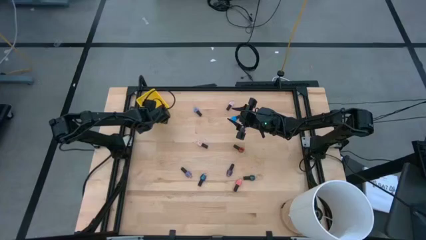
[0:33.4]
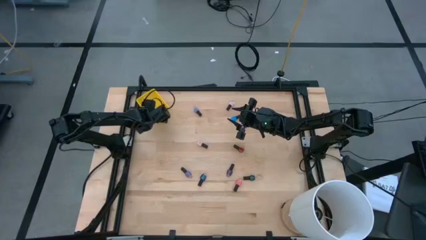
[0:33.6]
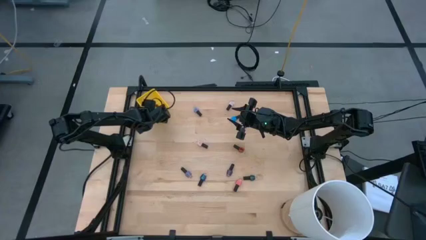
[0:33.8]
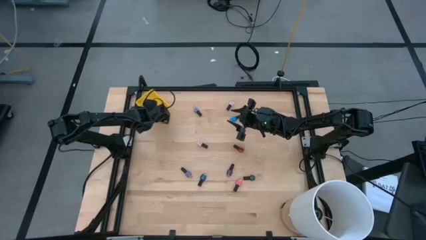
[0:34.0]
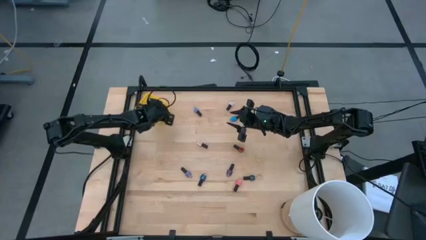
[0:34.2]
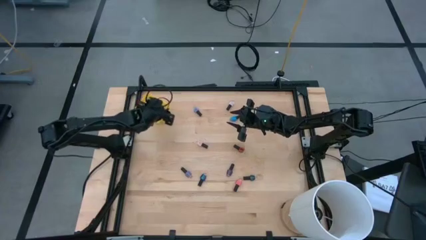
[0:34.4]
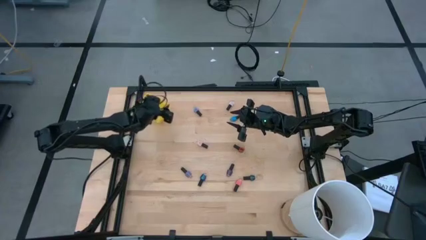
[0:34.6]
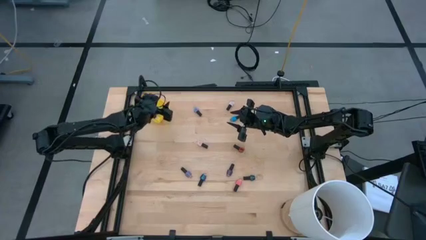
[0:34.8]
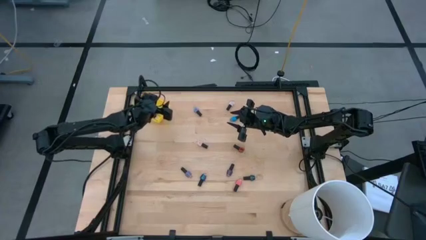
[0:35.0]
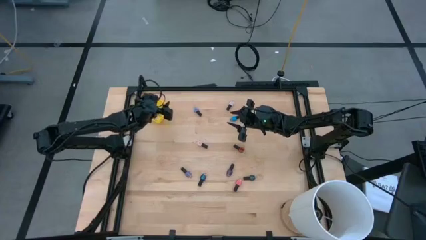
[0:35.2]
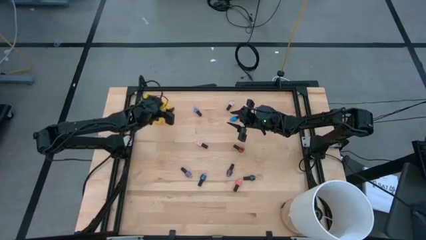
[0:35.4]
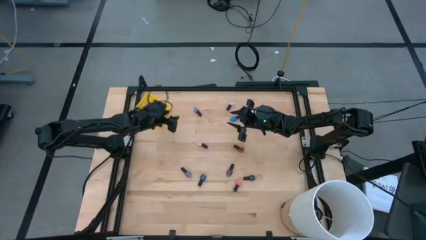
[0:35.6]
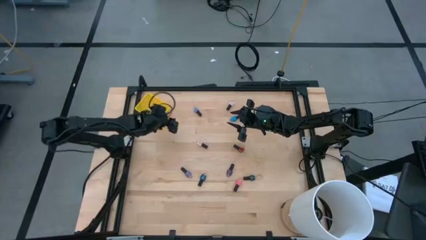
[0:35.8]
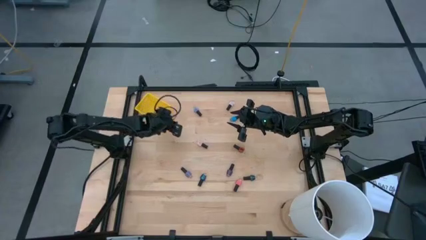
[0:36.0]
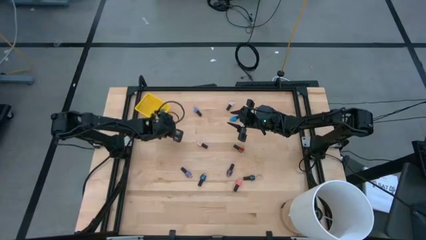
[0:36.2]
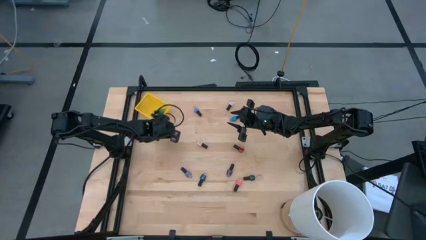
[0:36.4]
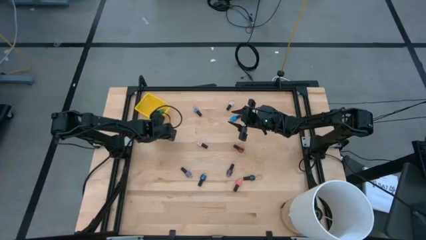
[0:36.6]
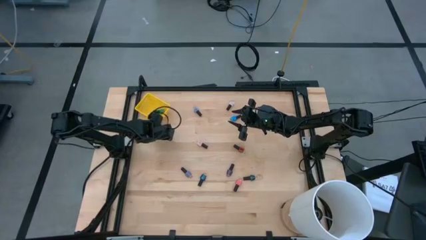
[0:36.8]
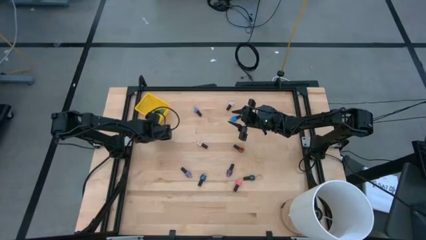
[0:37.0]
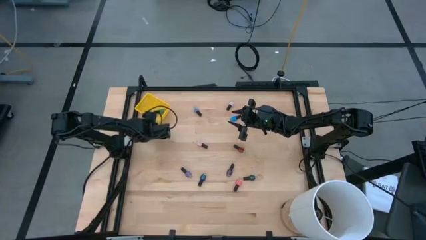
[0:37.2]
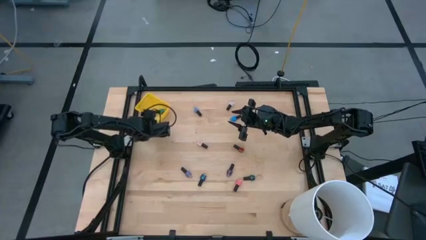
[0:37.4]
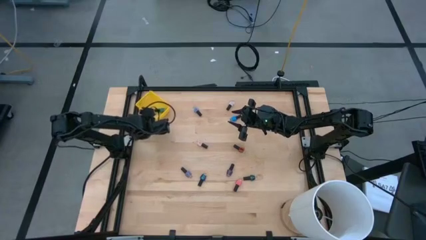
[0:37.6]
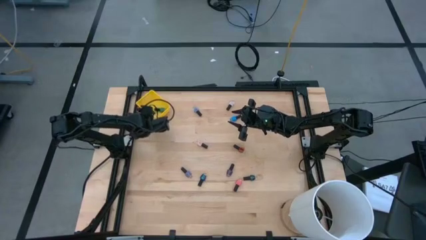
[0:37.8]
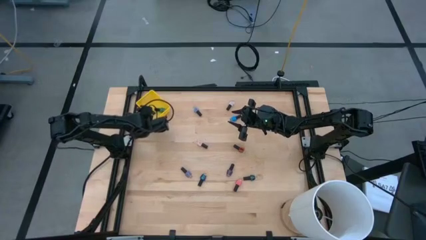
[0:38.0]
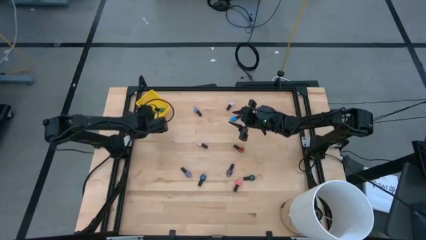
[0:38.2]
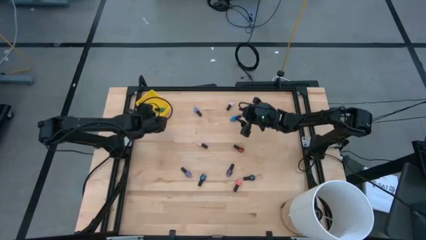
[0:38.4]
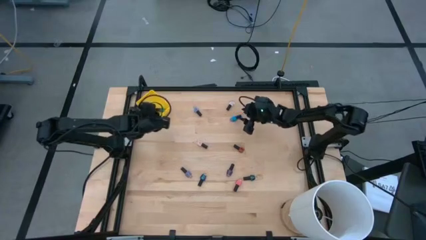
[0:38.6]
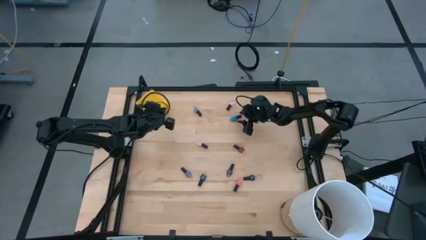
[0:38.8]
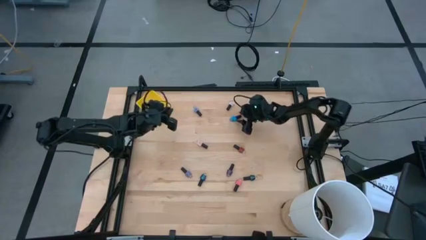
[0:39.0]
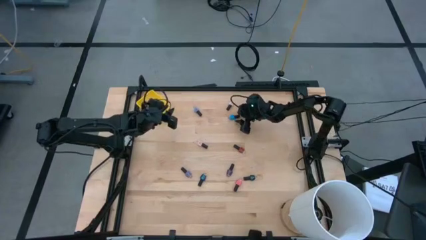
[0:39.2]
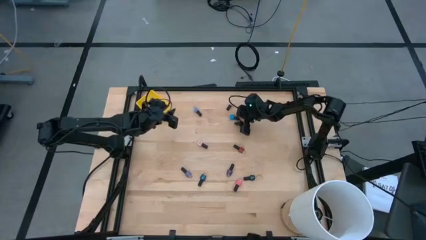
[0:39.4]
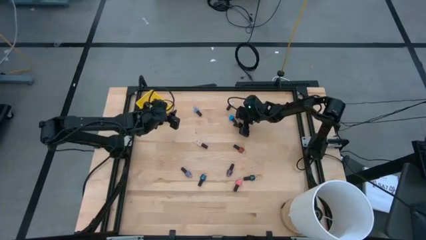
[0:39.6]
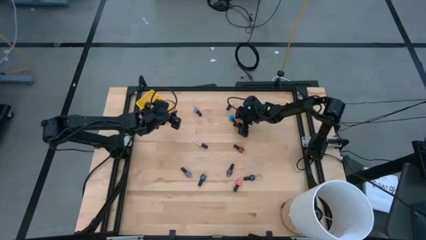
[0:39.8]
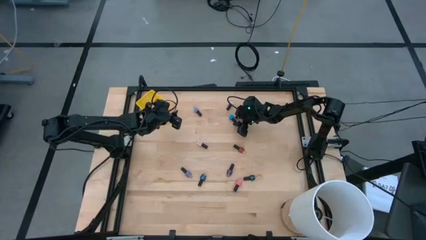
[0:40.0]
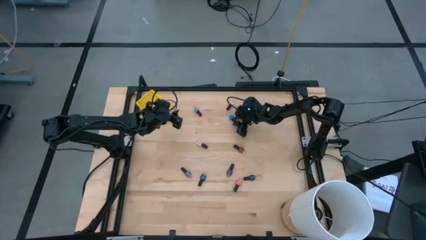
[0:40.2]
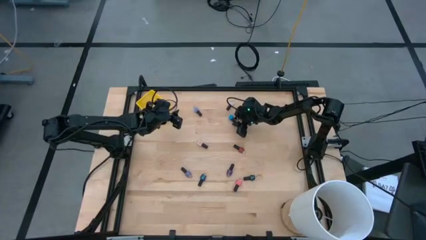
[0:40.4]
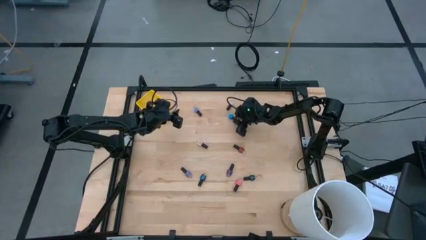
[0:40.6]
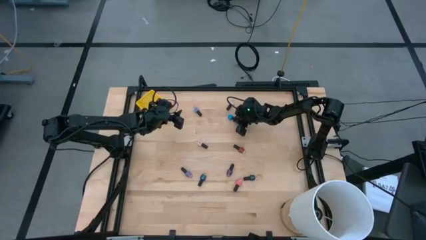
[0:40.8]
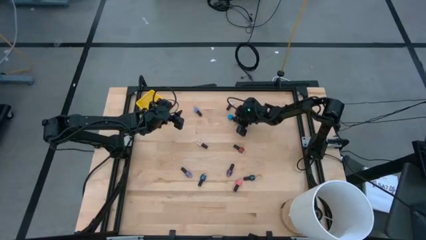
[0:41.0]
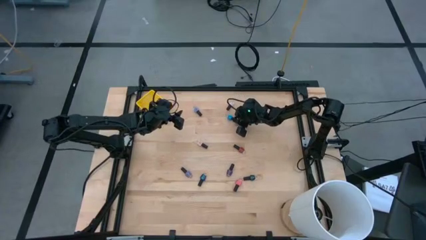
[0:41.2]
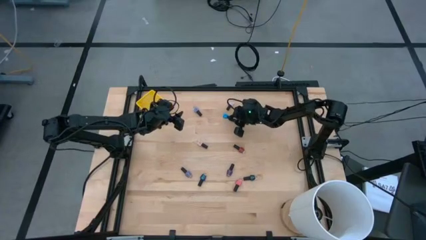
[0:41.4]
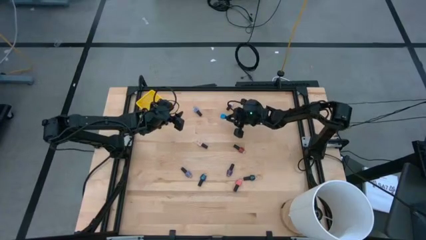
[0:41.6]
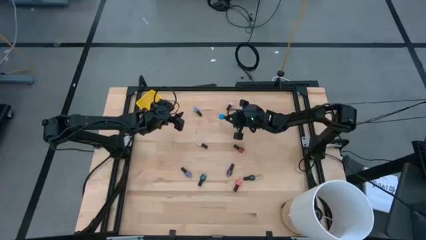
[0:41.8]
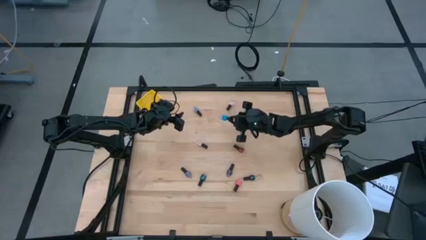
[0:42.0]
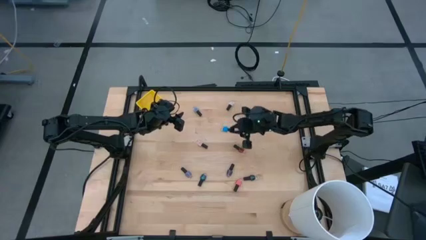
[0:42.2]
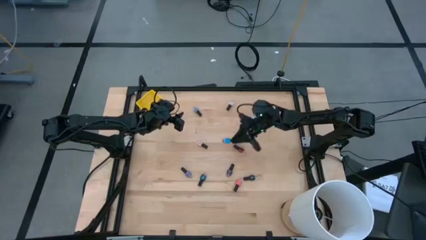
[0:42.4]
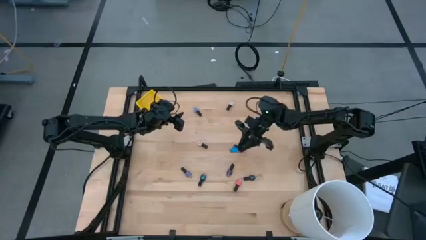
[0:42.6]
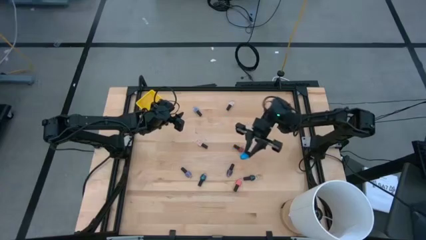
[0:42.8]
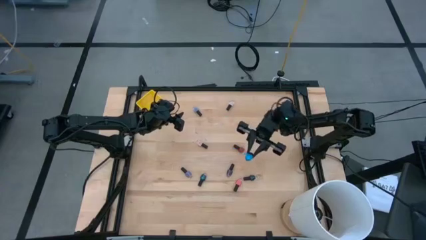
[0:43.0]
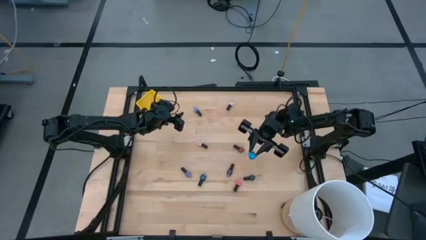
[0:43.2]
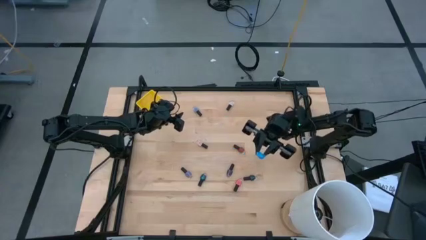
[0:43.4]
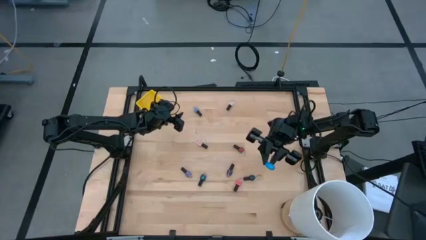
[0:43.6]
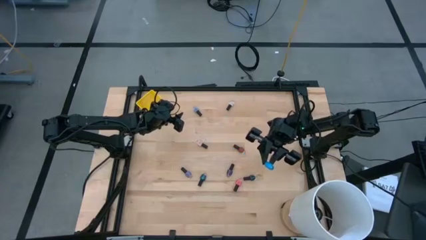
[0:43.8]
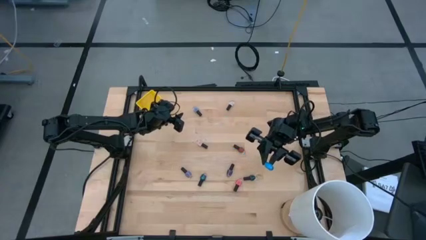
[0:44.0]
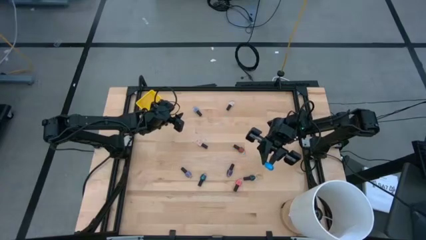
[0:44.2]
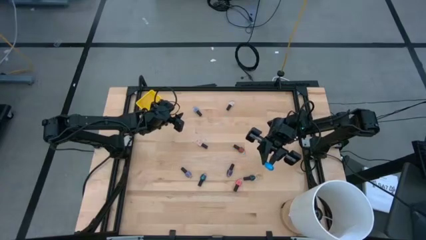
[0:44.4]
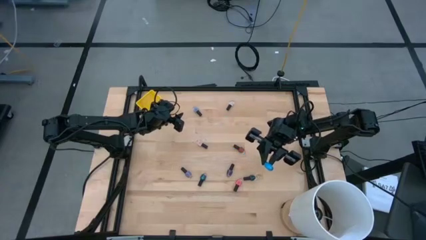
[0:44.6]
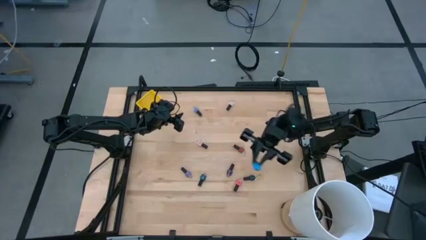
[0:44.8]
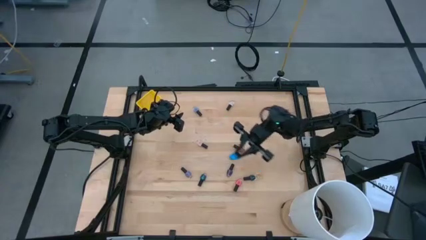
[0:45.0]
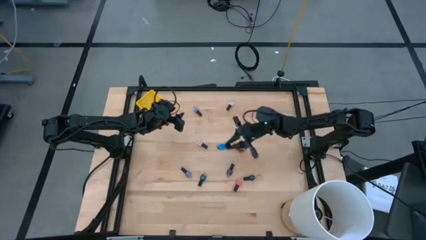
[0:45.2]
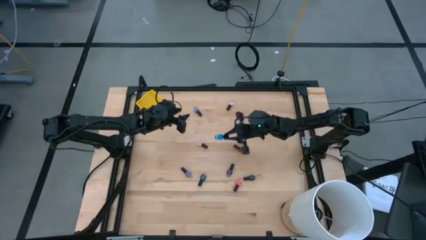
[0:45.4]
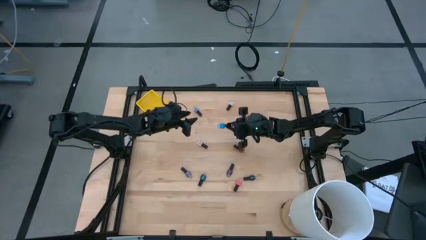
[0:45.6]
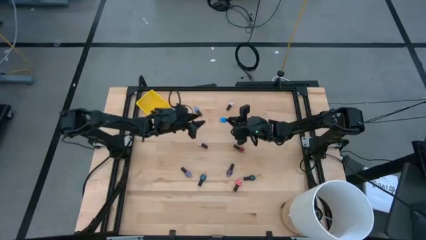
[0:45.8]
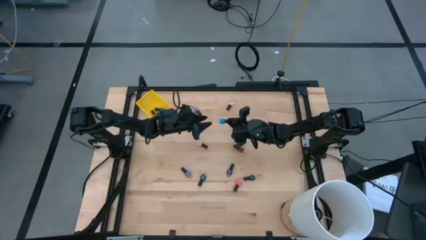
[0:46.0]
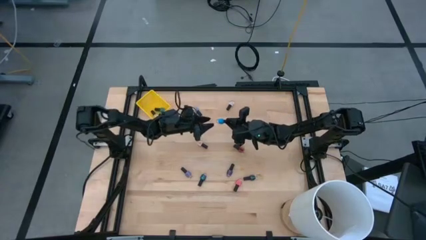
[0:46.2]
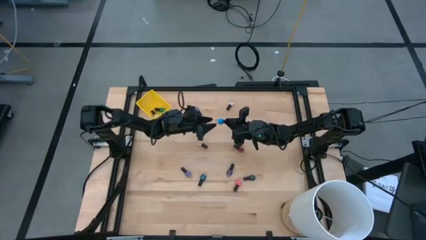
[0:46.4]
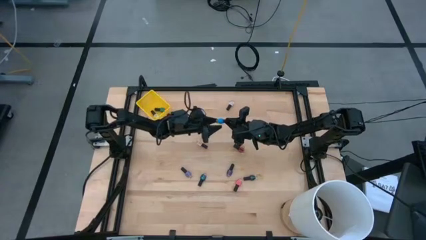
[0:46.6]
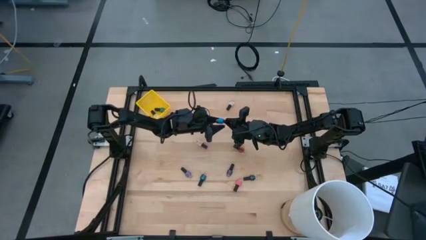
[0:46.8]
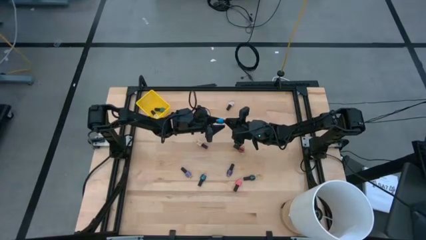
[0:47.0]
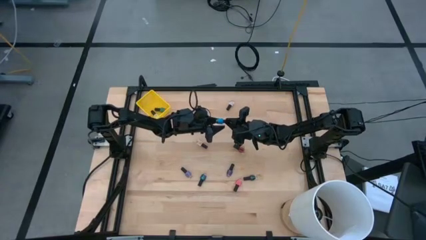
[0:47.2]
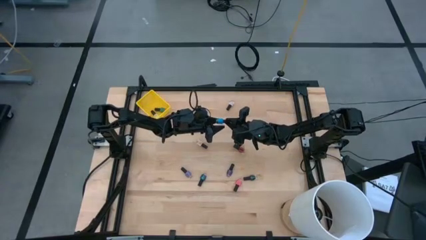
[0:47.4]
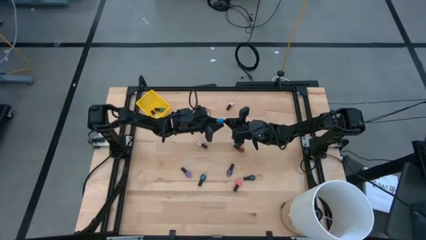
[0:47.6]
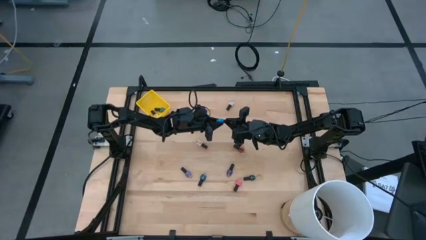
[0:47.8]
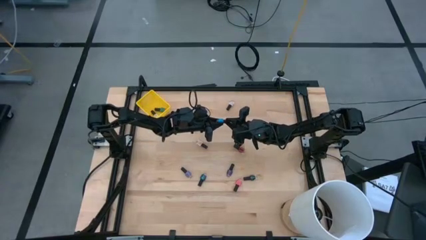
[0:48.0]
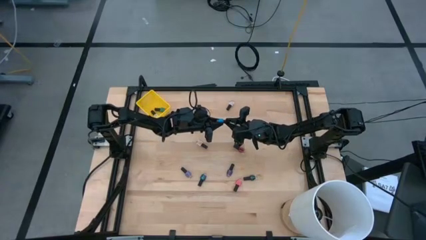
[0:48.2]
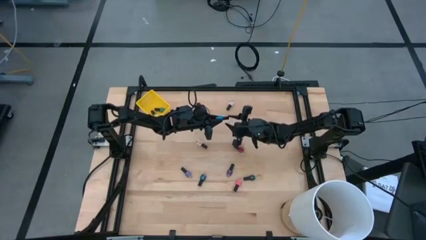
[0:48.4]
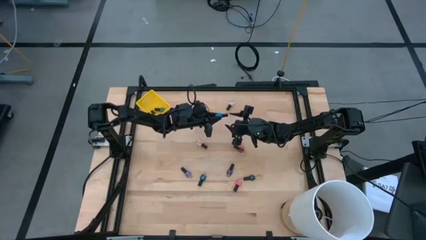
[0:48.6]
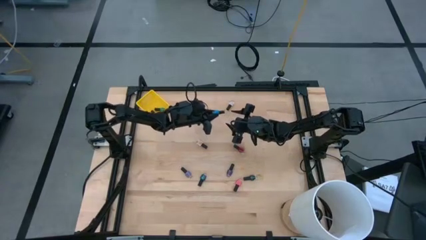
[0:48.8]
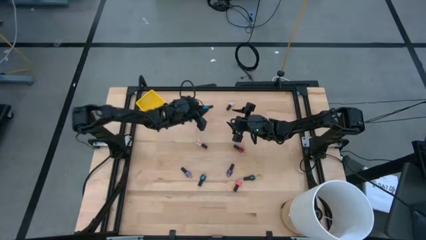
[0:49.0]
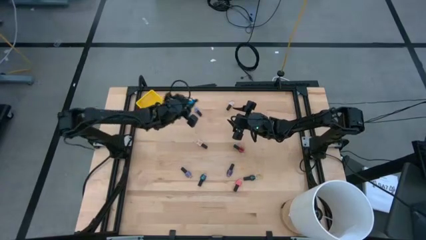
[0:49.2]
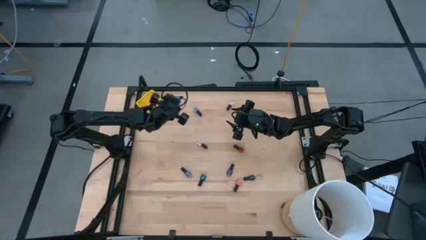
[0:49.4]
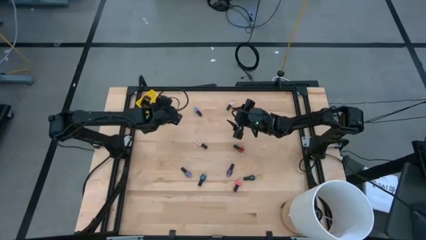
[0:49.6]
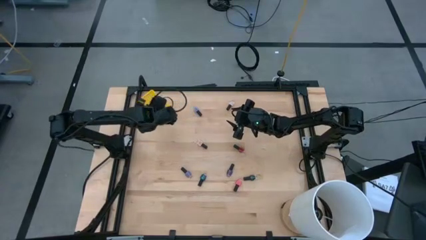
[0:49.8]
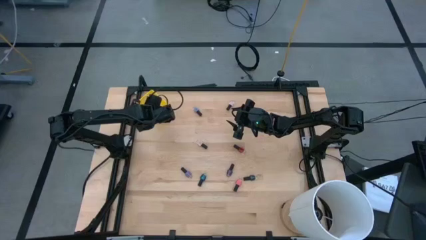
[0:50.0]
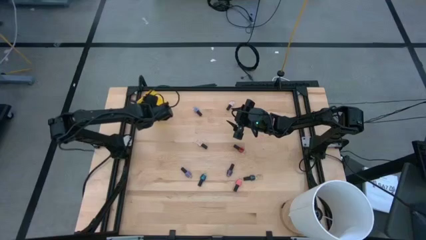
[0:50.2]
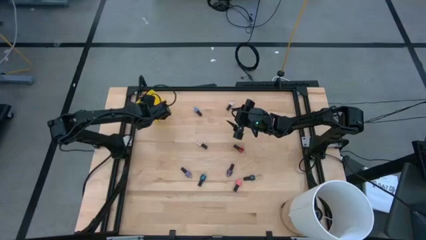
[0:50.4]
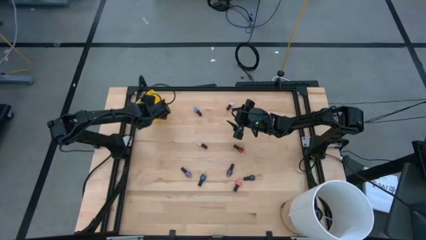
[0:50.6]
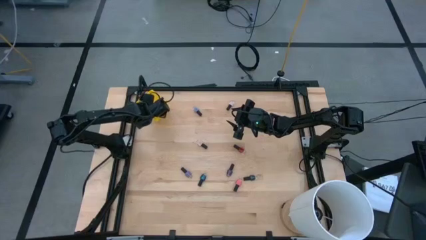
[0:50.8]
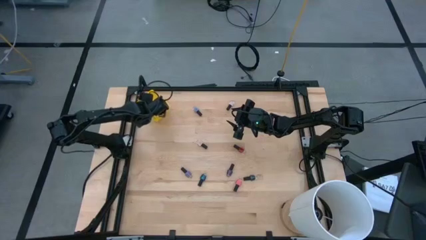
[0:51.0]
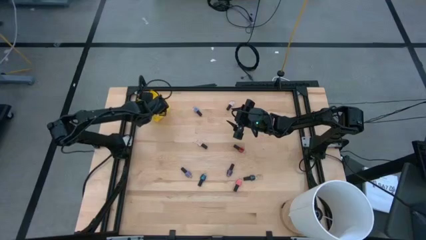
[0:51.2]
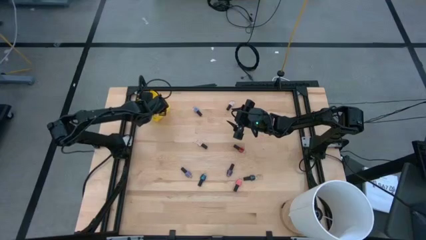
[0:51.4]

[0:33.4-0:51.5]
Task: Pick & Place Nail Polish
Put the blue nail polish into the yellow bin
